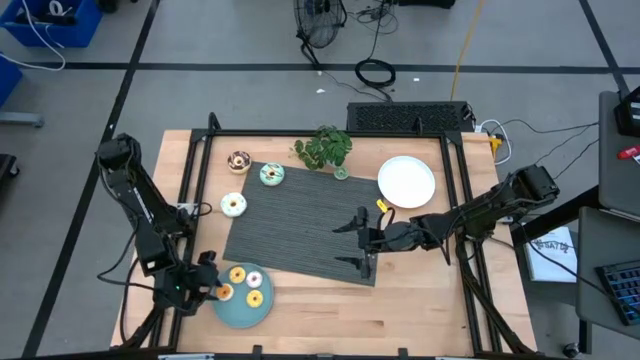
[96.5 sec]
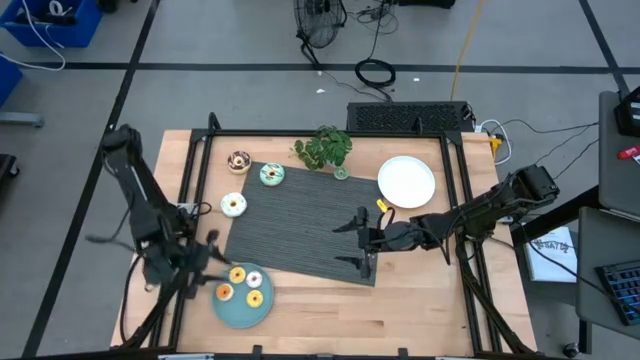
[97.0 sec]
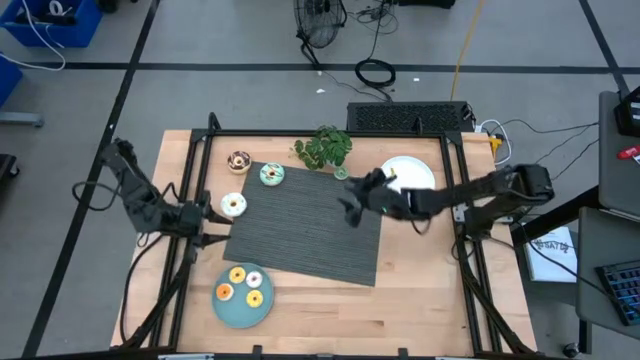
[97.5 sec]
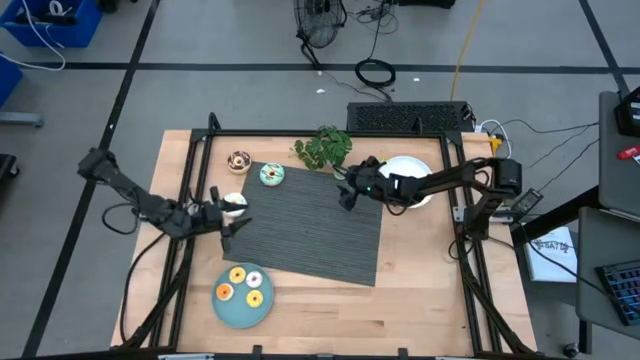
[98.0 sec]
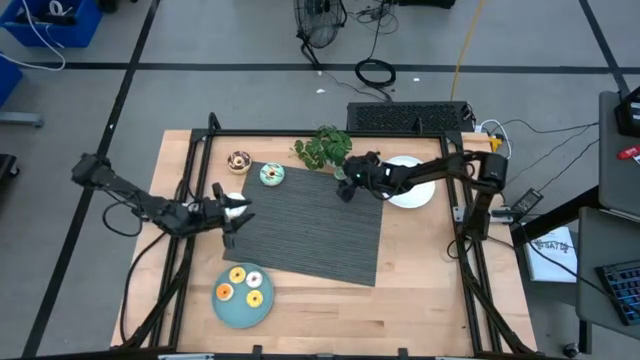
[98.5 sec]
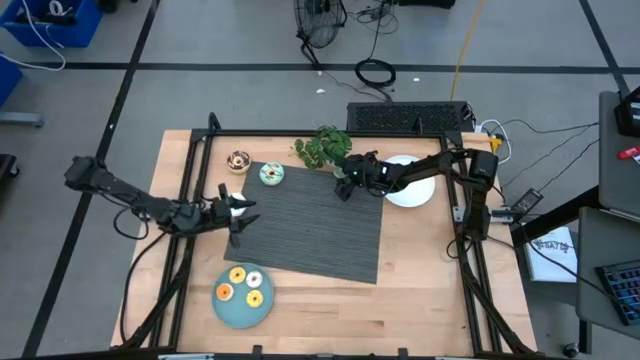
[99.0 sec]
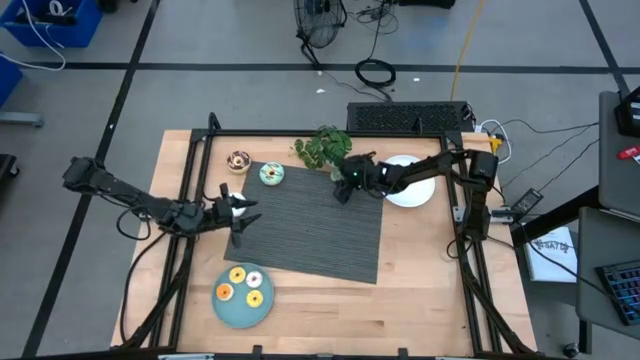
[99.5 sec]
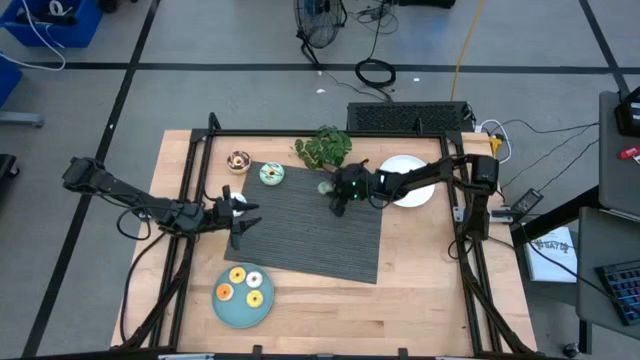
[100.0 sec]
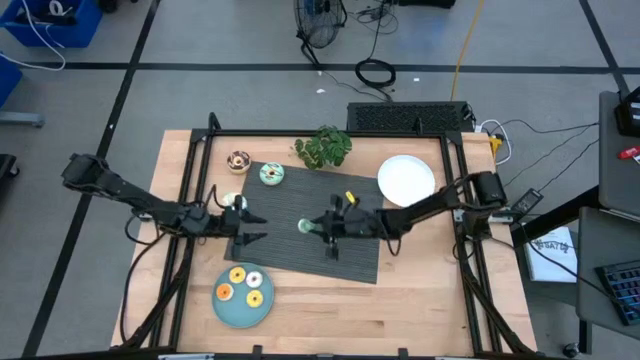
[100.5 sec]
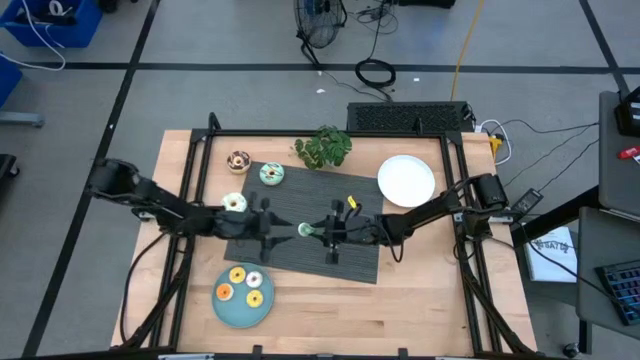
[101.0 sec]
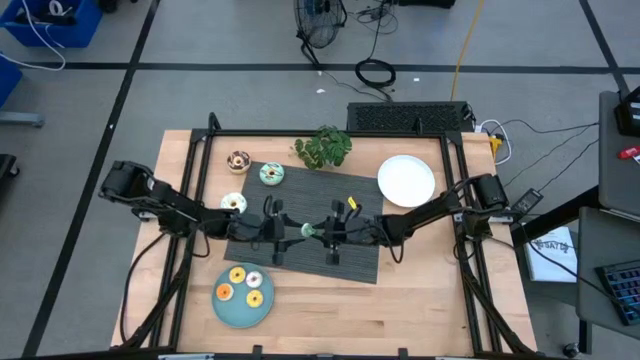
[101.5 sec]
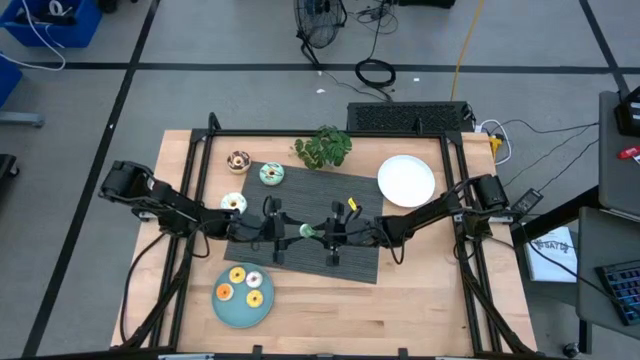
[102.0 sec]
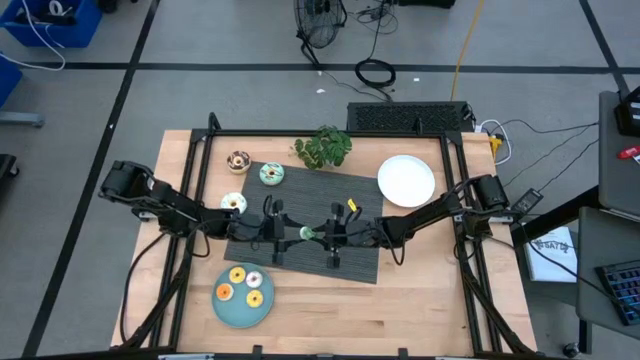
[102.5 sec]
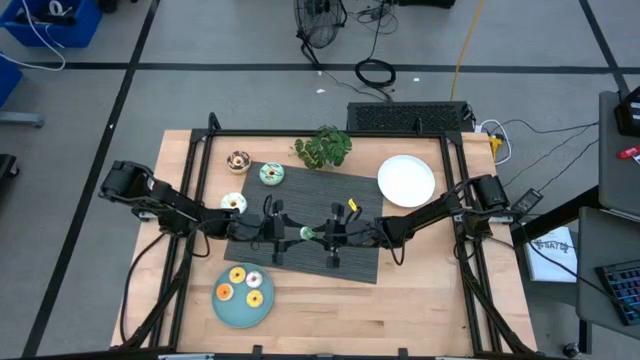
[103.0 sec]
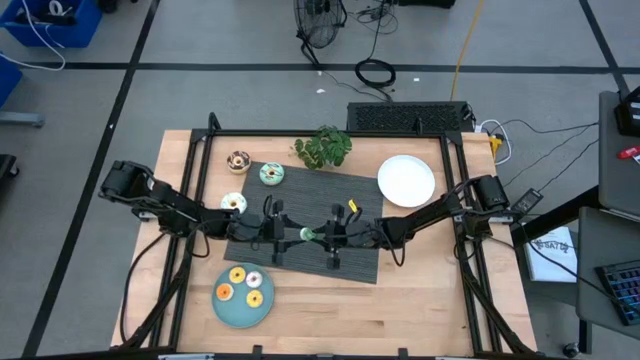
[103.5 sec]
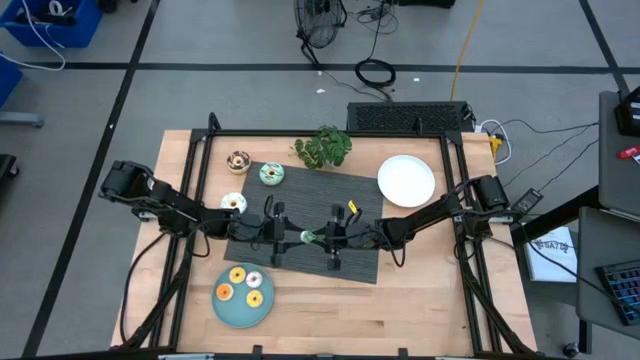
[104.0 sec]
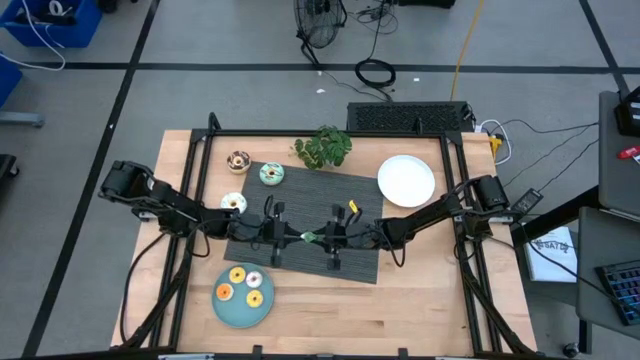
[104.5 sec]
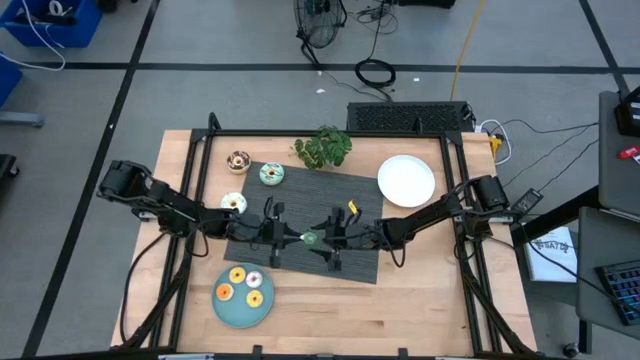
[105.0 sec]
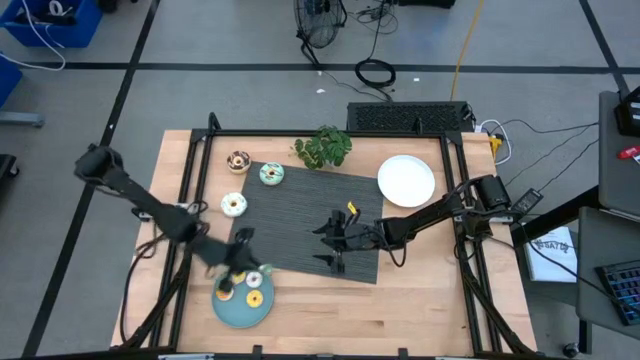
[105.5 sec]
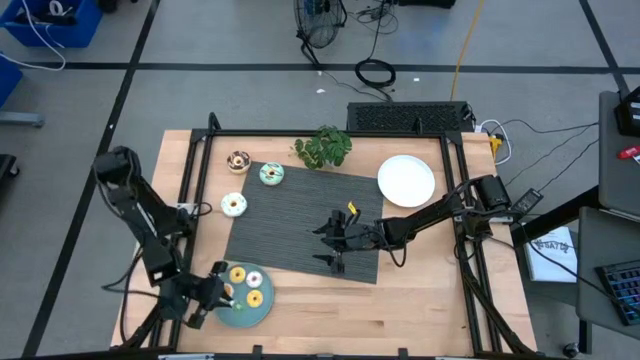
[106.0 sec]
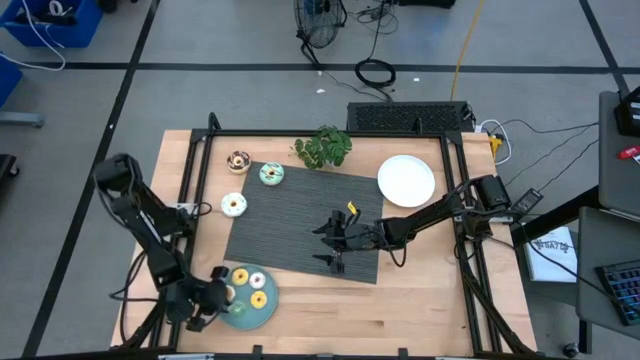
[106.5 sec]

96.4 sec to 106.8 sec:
Task: Pick & Place donuts
Put the green donut on the blue plate

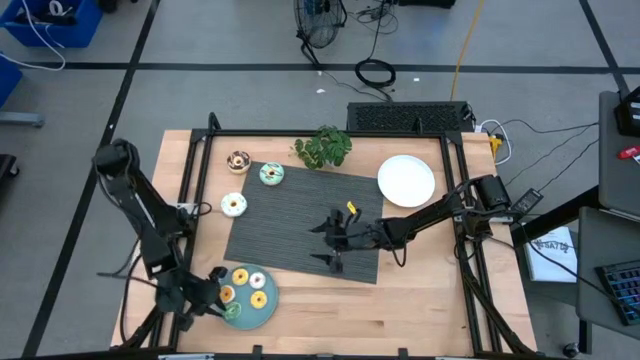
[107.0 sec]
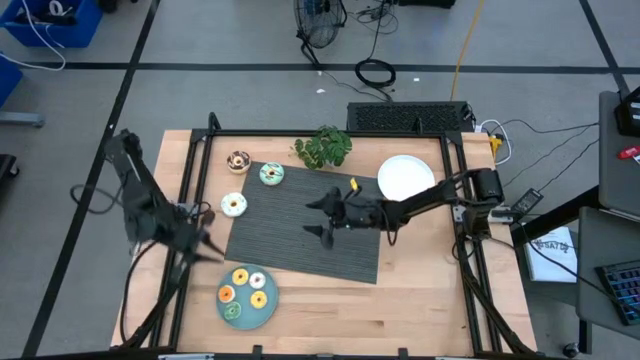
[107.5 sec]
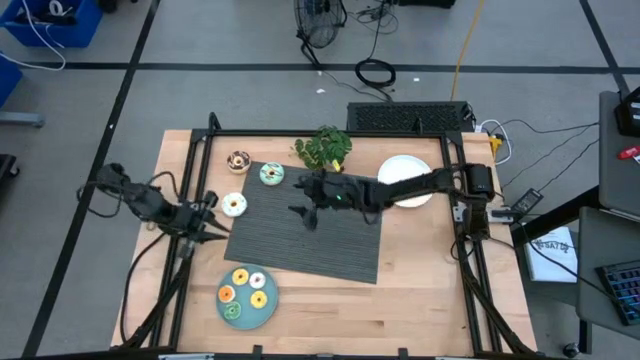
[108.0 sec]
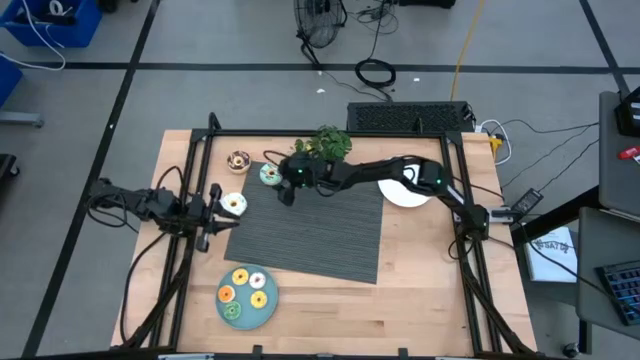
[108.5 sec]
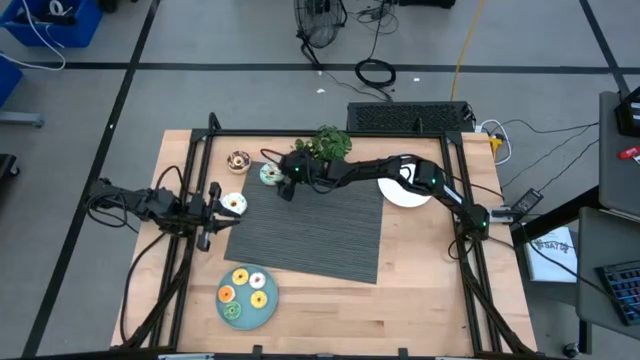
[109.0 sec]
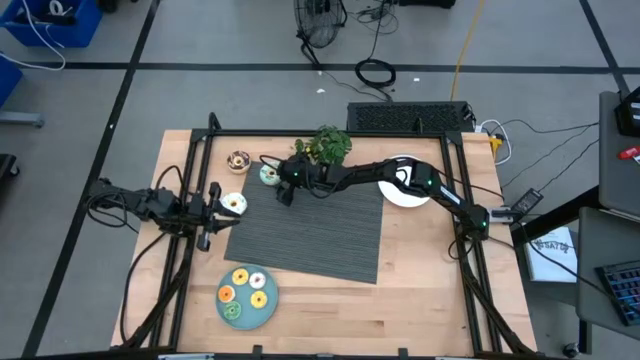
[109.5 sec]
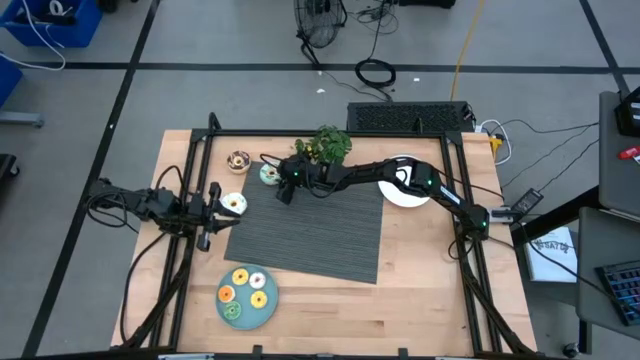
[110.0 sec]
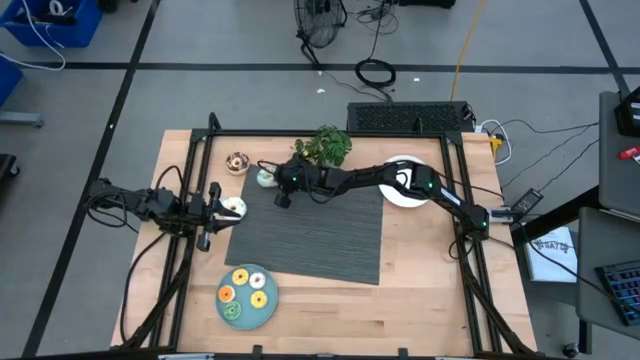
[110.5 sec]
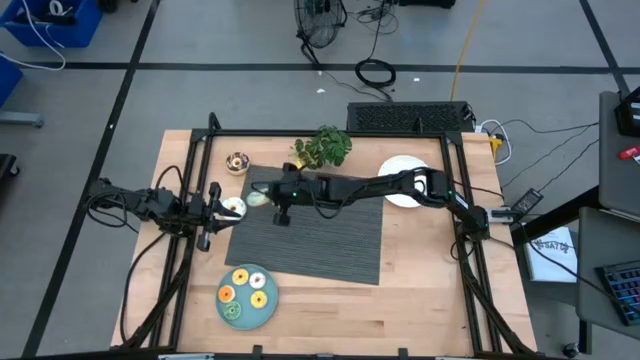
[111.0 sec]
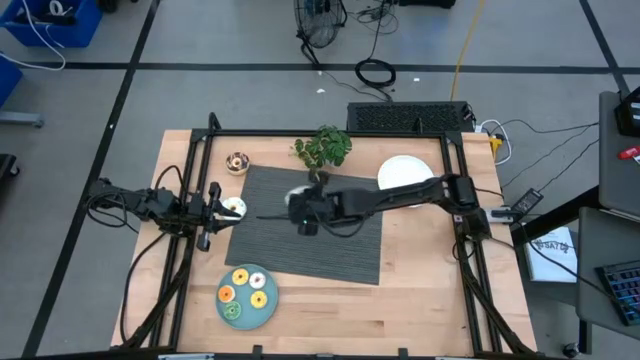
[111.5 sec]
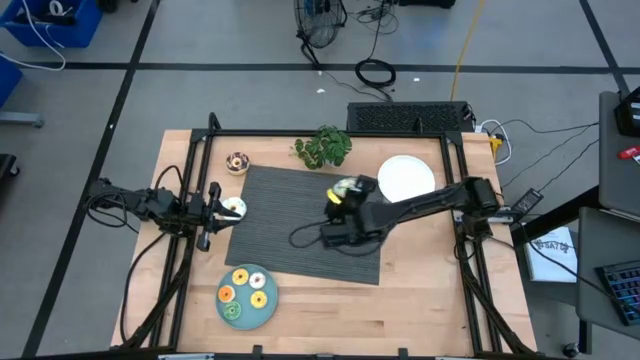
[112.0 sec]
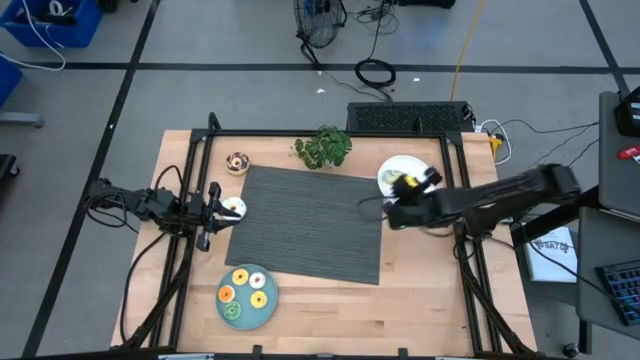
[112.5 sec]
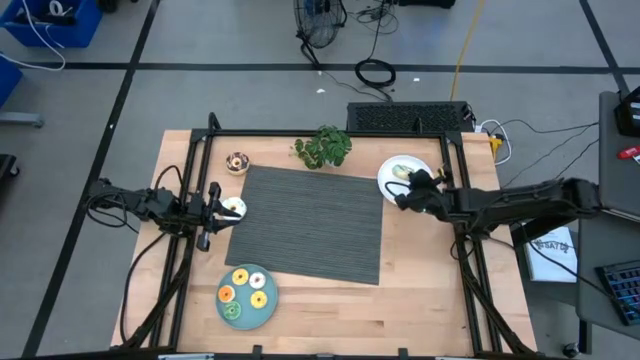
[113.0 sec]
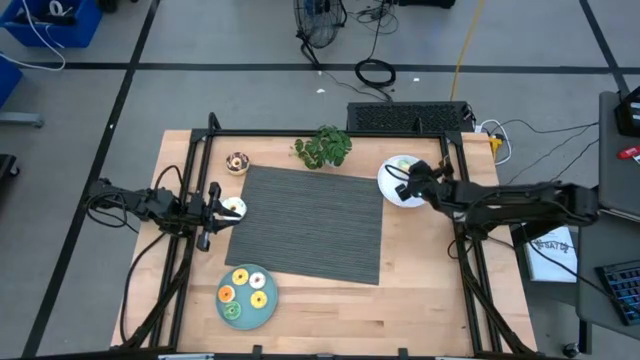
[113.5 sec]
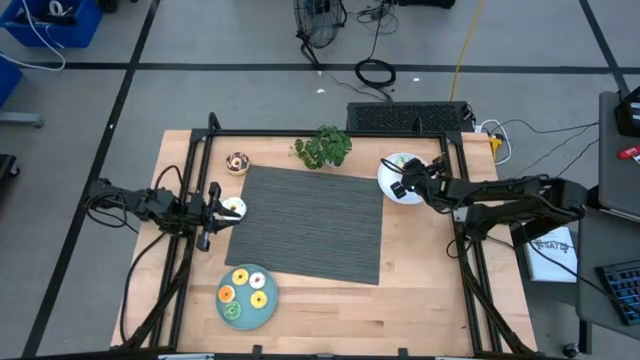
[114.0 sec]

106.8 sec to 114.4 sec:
Put the big light green donut on the white plate

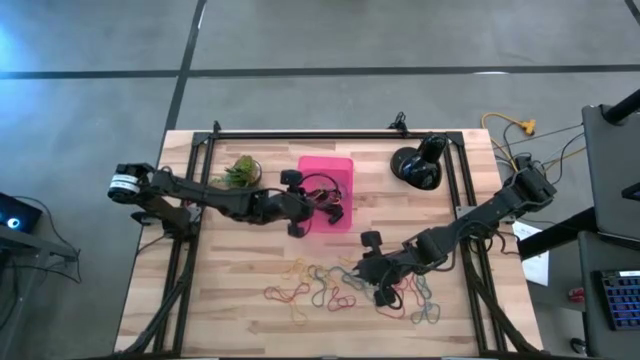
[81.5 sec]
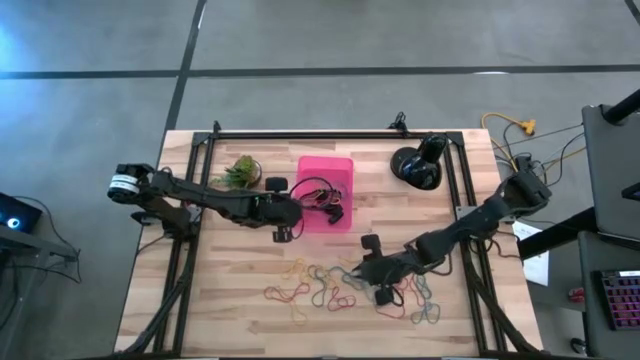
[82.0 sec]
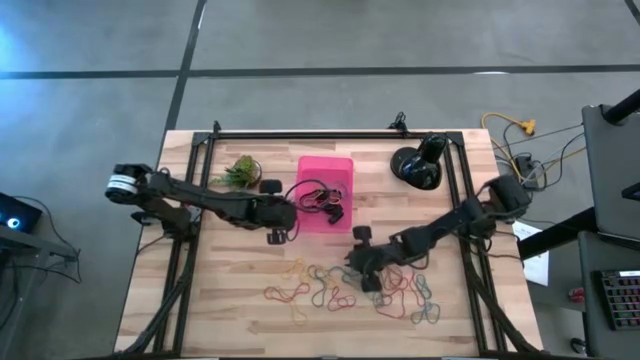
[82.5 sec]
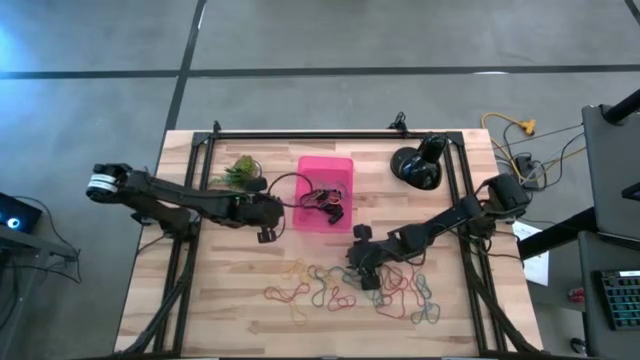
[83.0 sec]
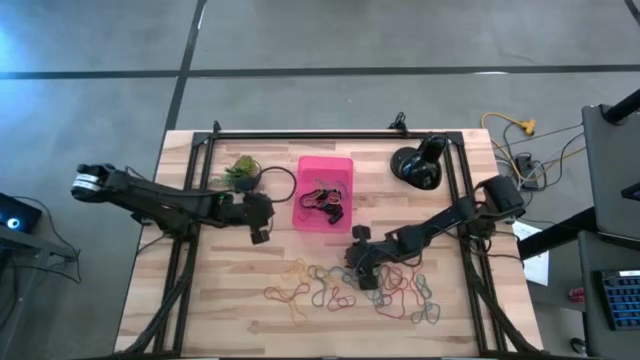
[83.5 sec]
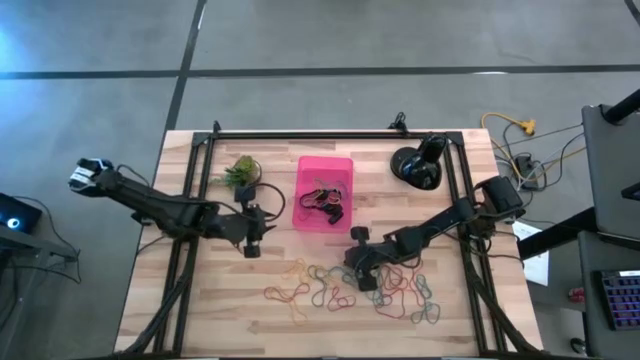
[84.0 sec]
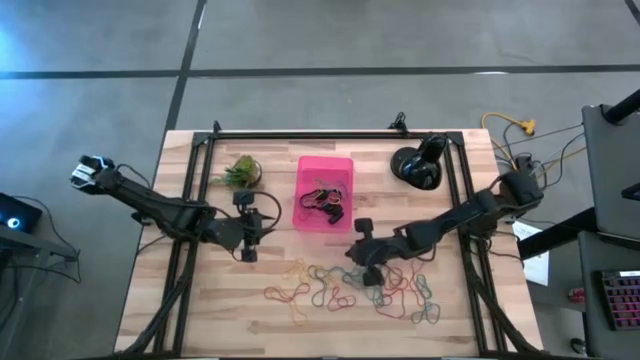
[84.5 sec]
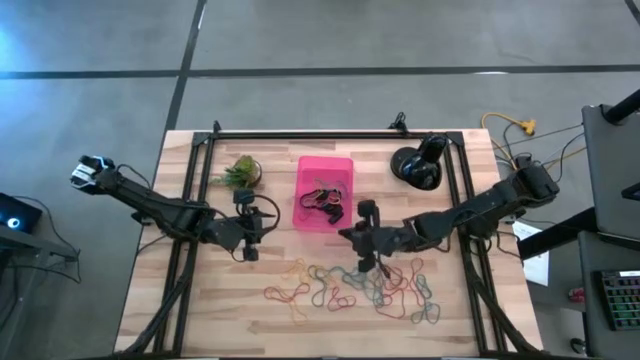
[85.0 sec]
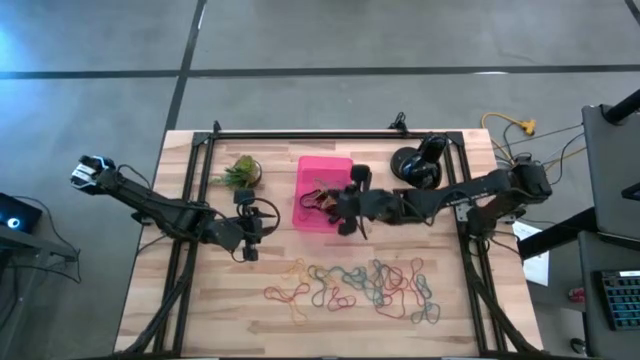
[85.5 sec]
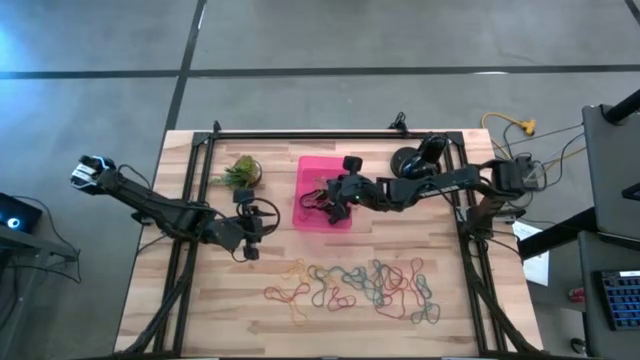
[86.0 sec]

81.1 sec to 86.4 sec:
Task: Pick and place rubber bands into bin
Put the yellow rubber bands into the pink bin
